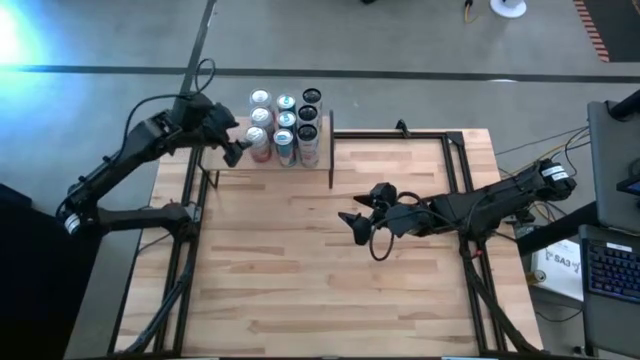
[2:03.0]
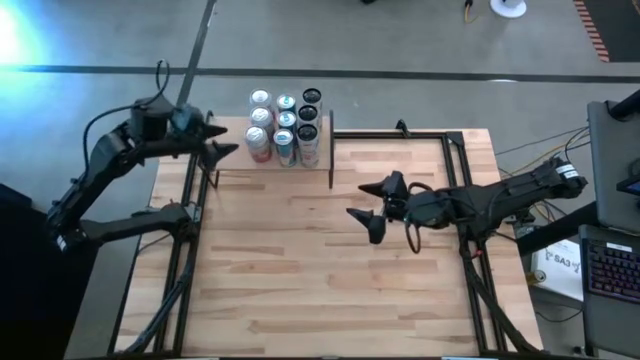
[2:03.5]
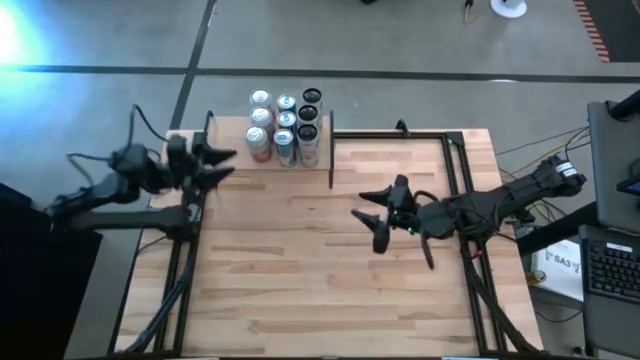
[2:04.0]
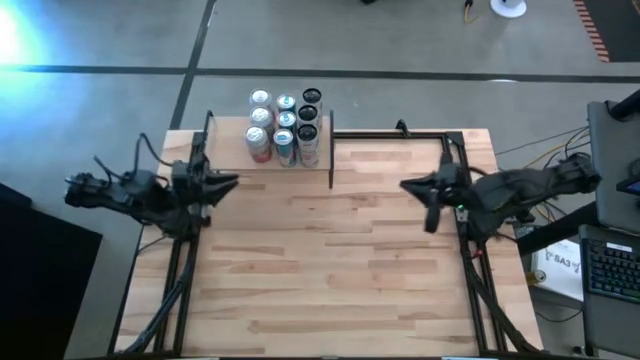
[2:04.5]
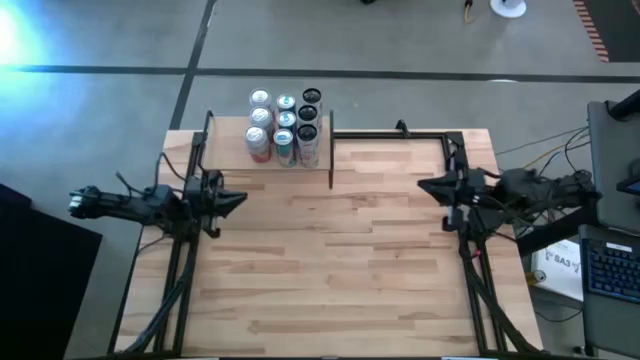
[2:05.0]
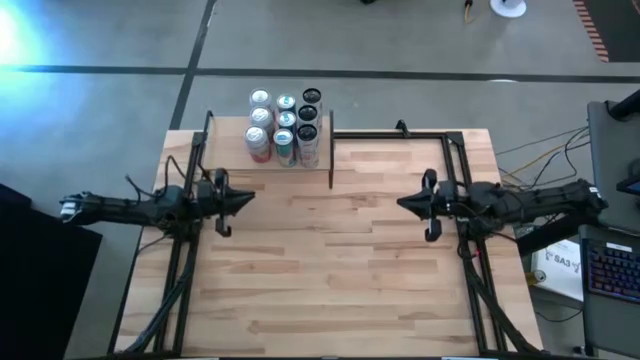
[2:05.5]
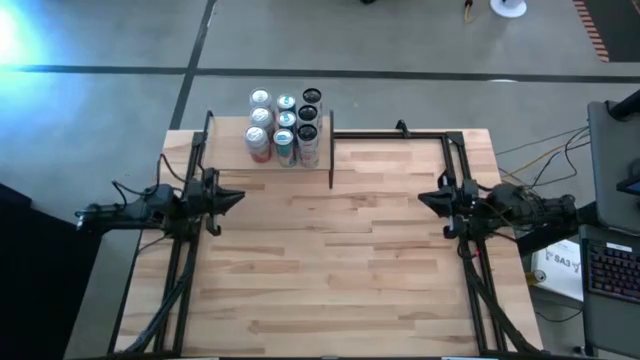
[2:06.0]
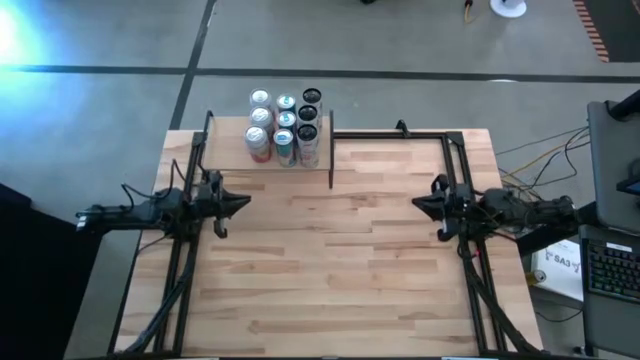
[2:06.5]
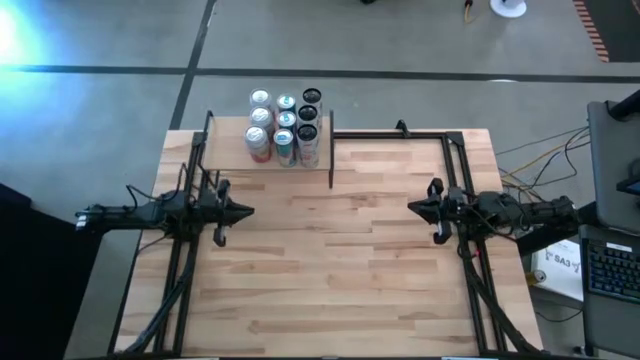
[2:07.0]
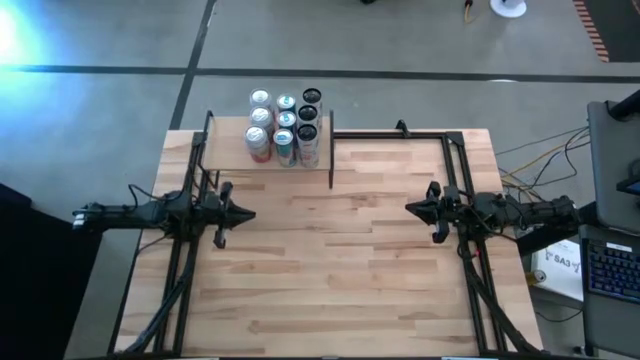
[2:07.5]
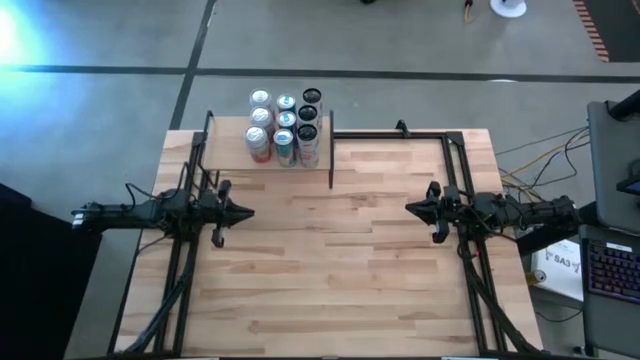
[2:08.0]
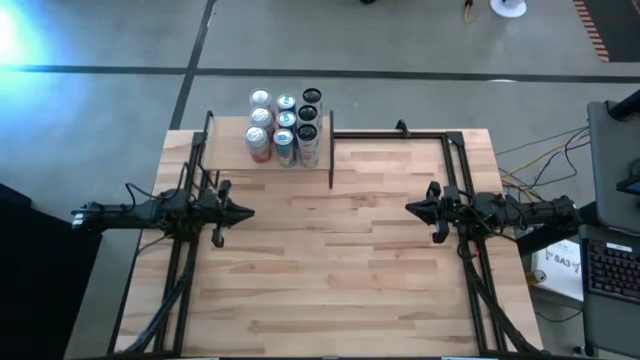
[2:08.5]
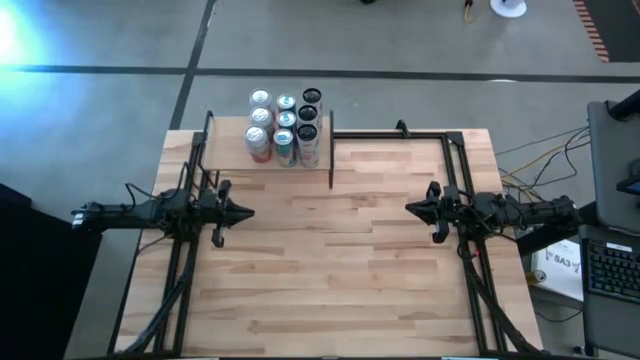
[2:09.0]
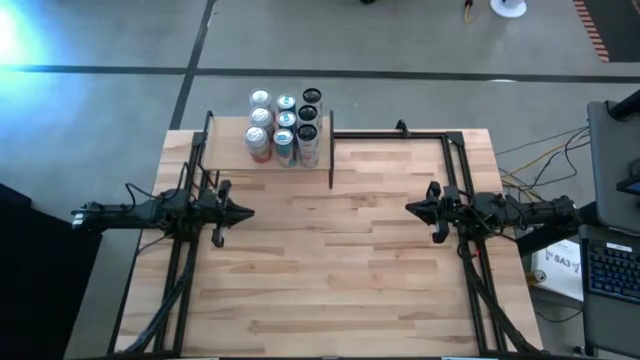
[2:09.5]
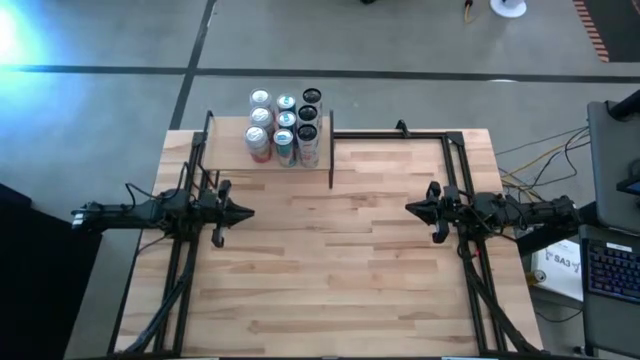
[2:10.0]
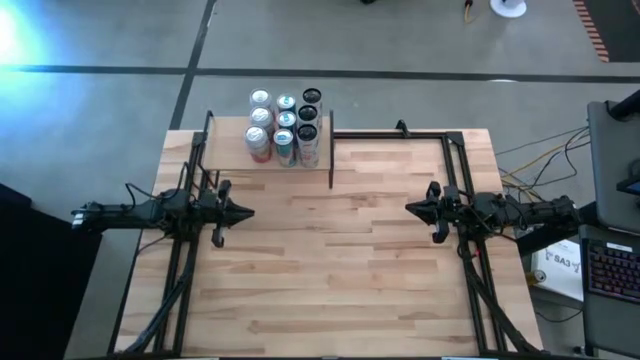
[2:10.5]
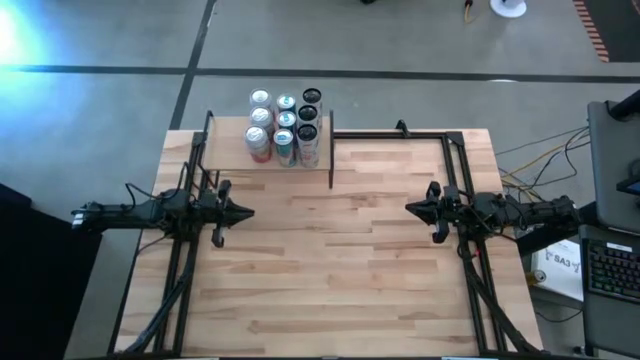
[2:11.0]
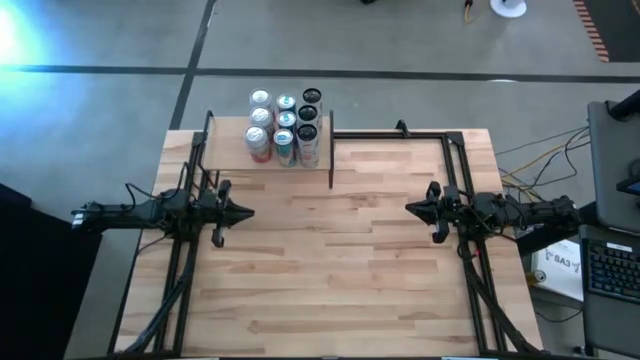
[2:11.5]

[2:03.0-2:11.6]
Task: Place canned beverage on shelf
Return to Home Position

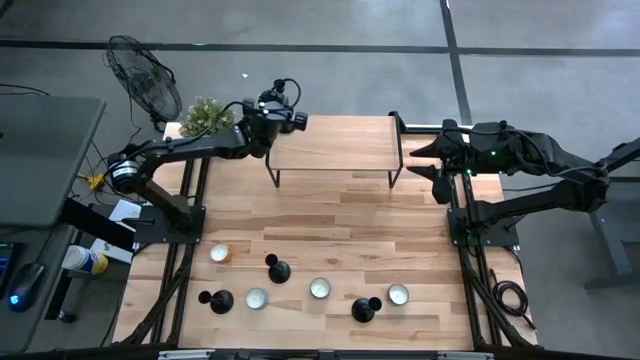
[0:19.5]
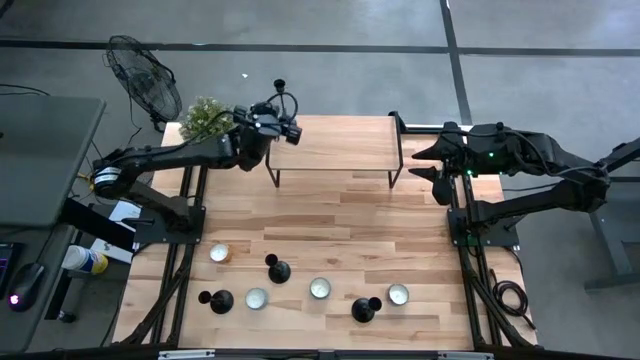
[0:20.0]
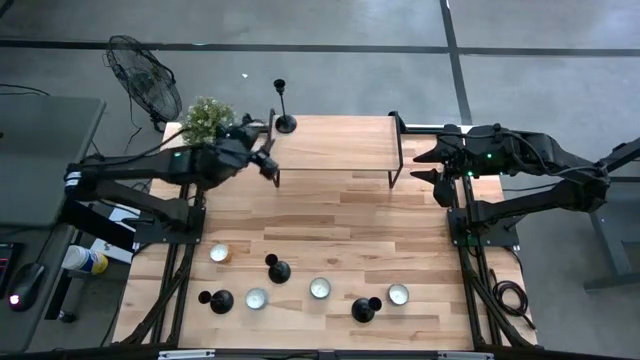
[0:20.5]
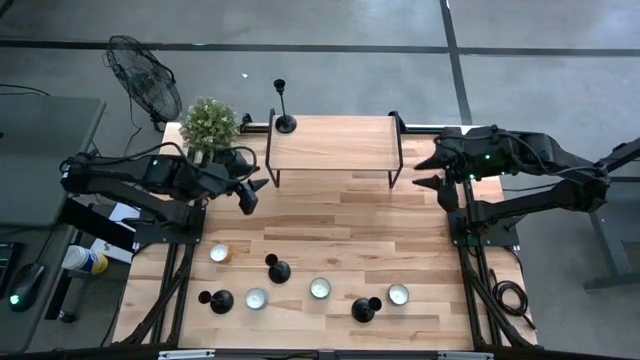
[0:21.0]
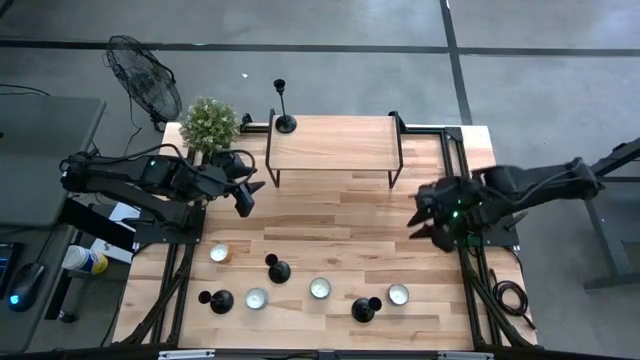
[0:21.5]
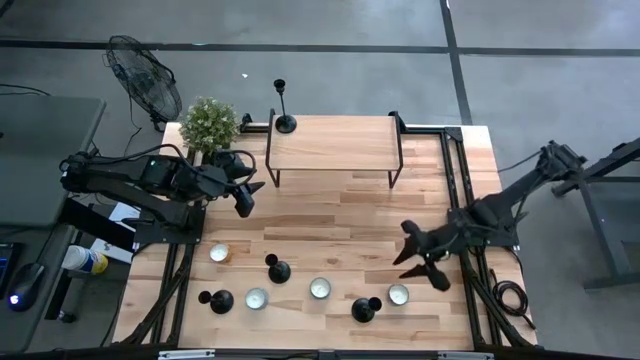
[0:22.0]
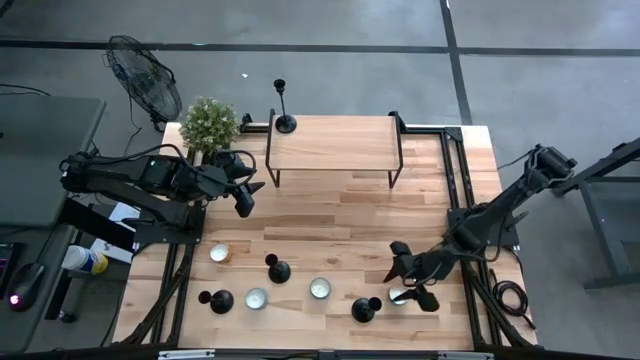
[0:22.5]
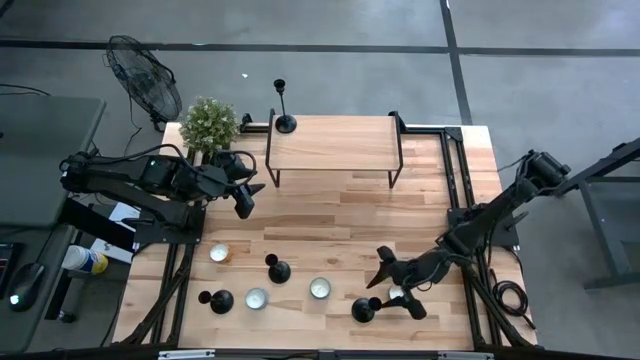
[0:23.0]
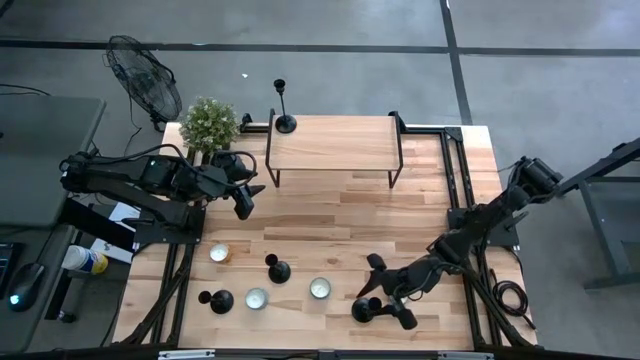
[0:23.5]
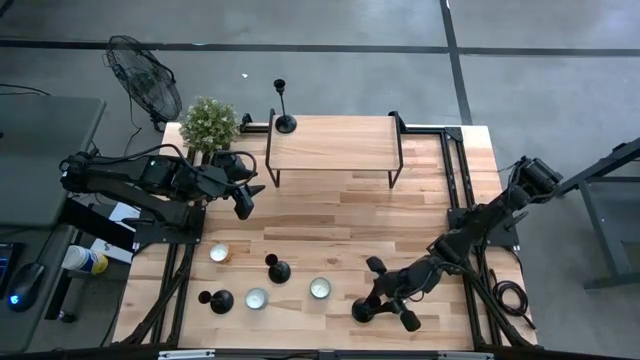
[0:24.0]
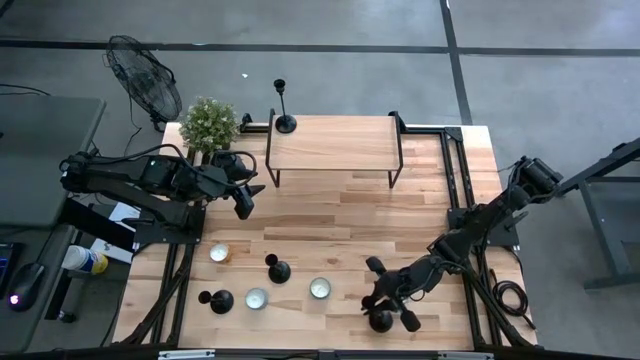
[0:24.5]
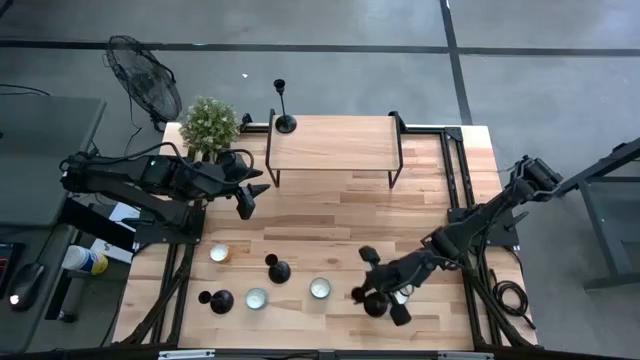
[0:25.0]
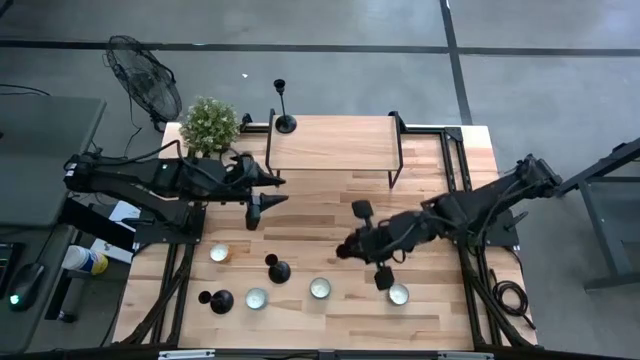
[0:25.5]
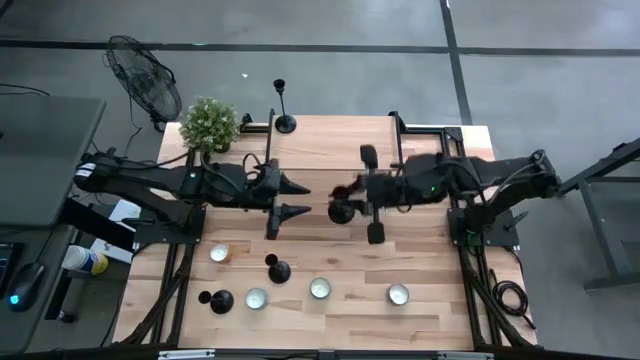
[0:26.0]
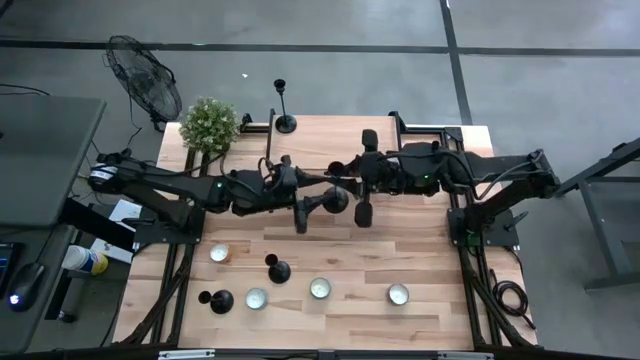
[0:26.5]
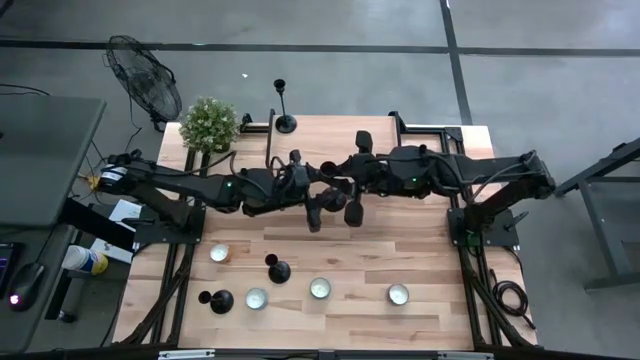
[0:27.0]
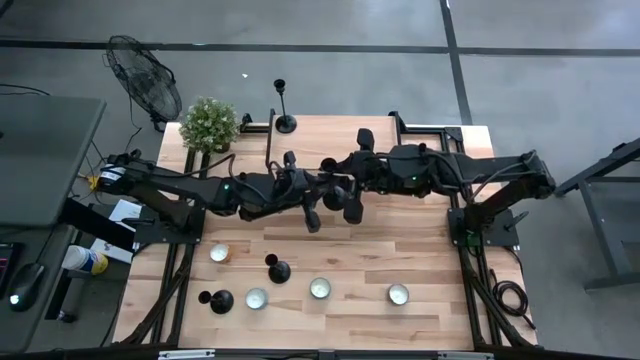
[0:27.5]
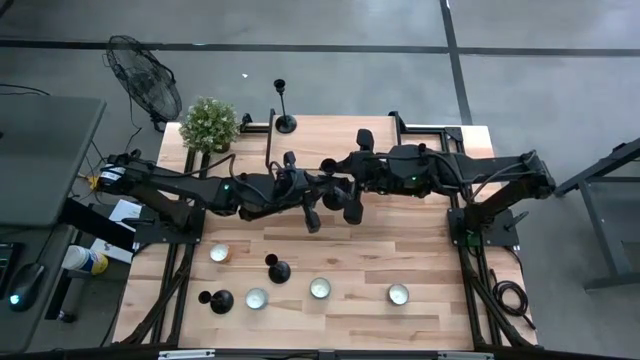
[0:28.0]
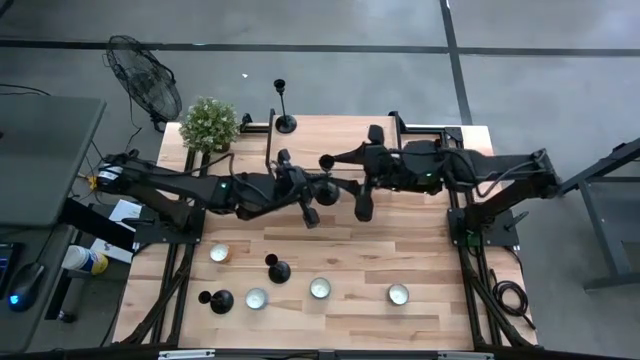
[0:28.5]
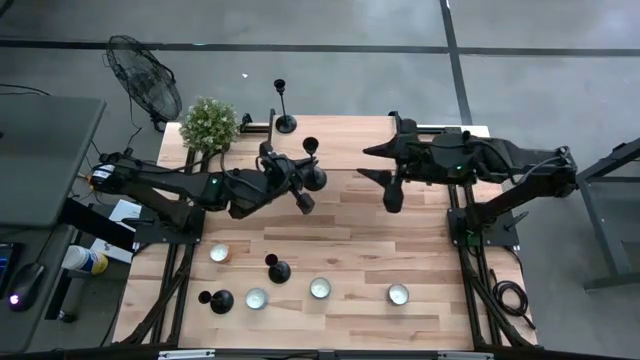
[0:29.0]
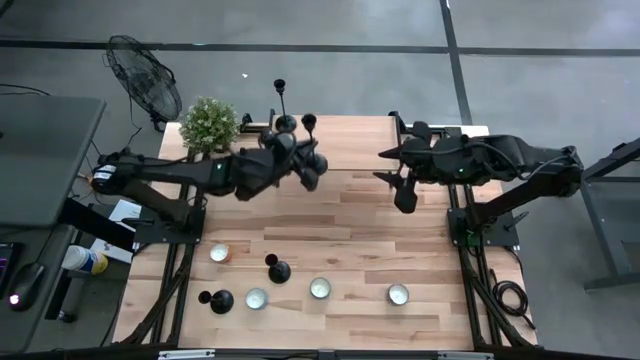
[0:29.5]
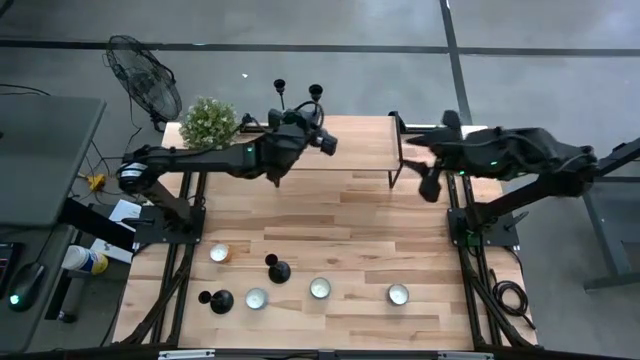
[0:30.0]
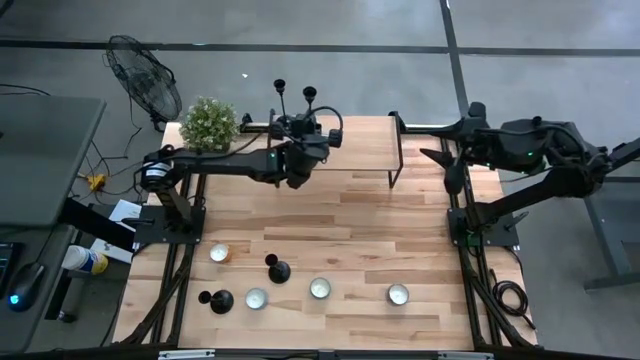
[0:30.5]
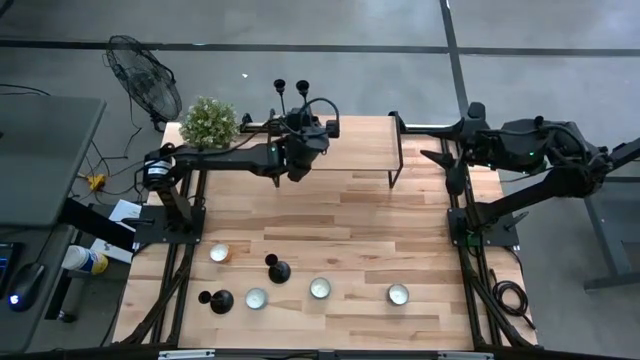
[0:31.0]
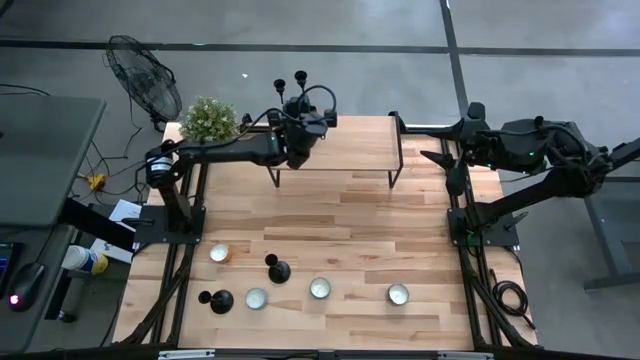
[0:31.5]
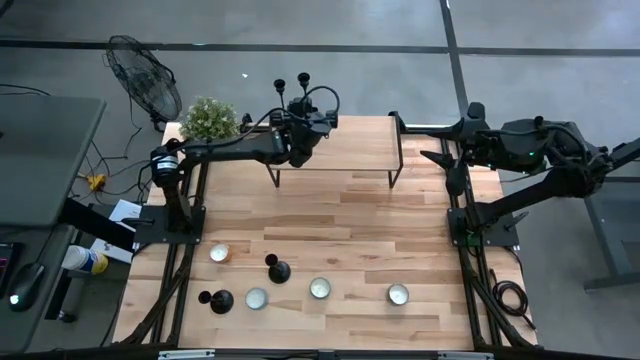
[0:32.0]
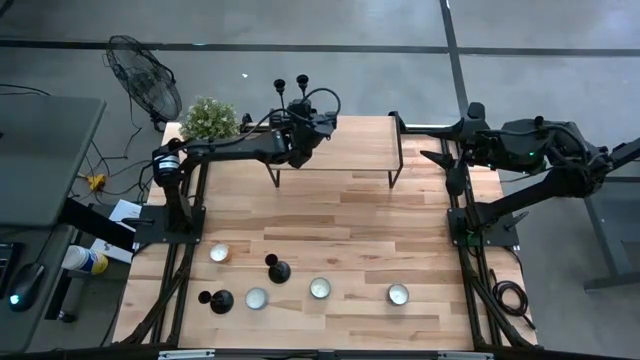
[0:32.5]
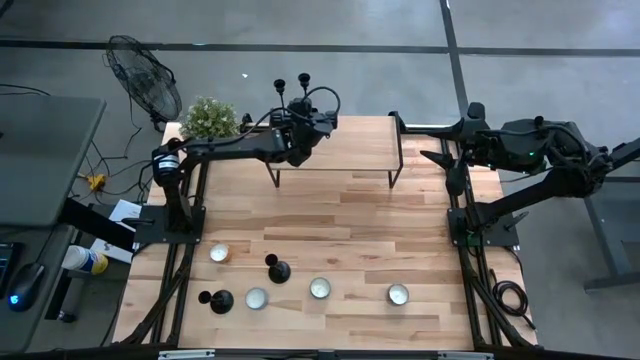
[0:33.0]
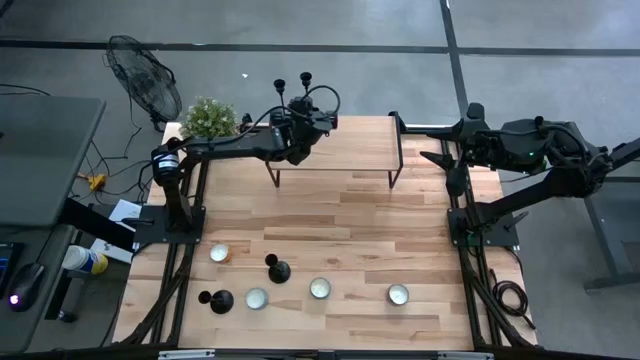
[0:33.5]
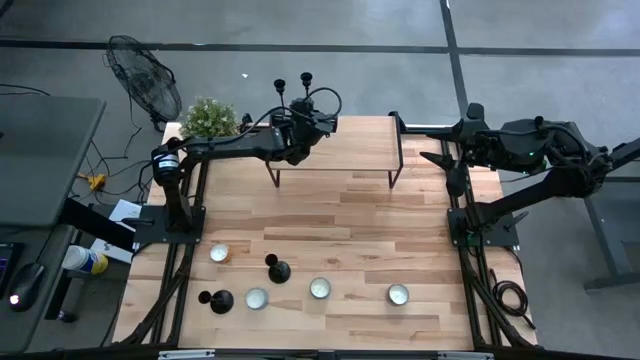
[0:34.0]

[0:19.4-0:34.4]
Task: Pick & Place candle stick holders
Put the black candle holder on the shelf
